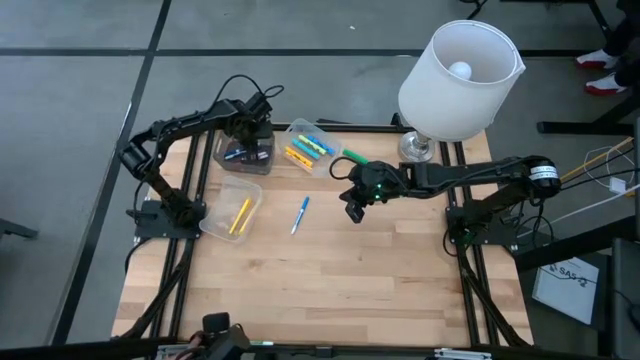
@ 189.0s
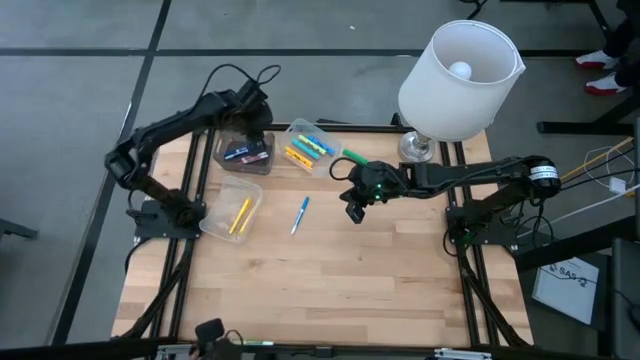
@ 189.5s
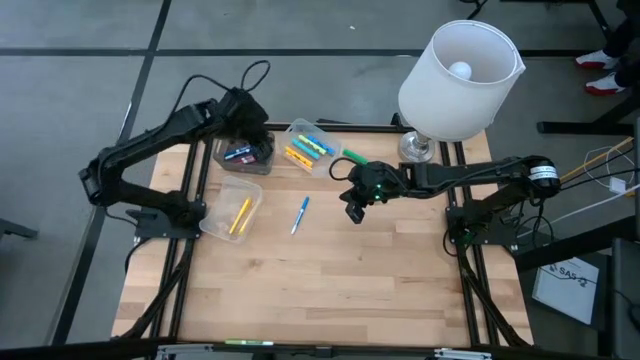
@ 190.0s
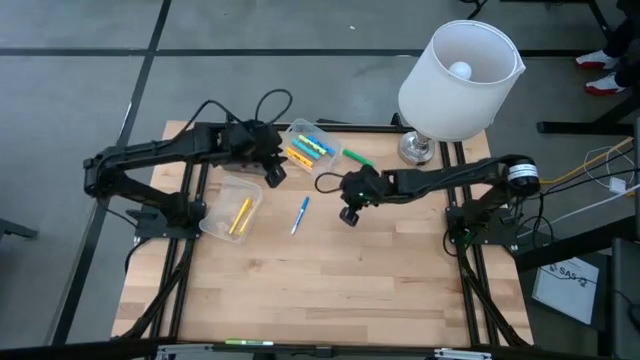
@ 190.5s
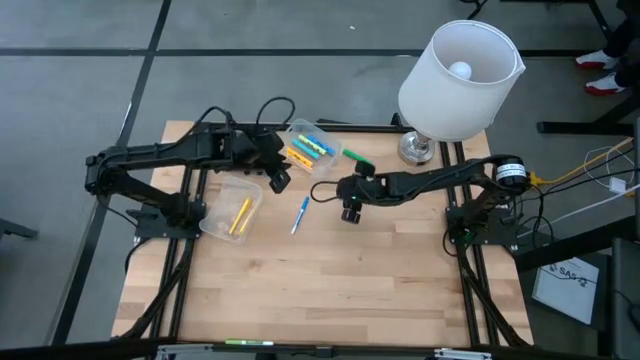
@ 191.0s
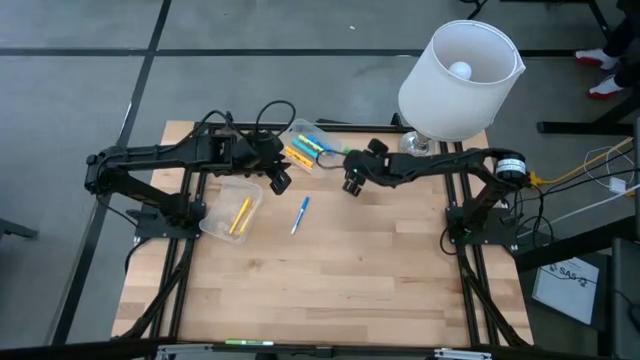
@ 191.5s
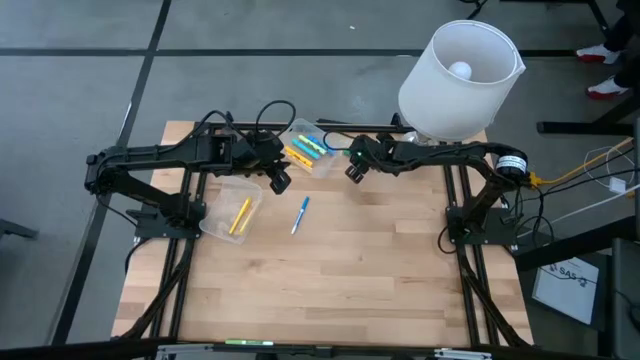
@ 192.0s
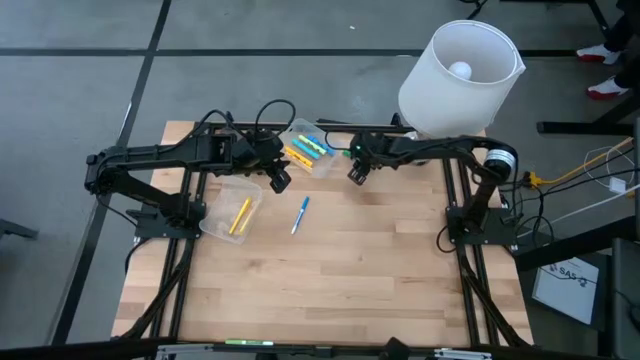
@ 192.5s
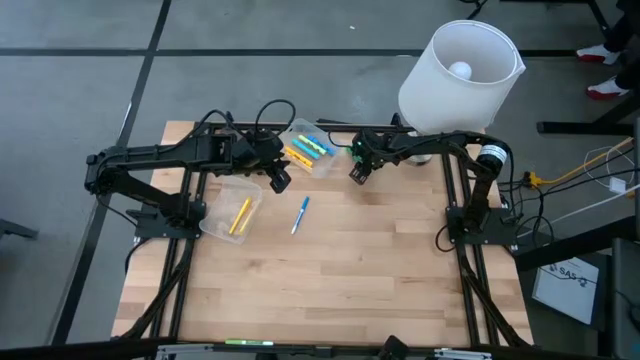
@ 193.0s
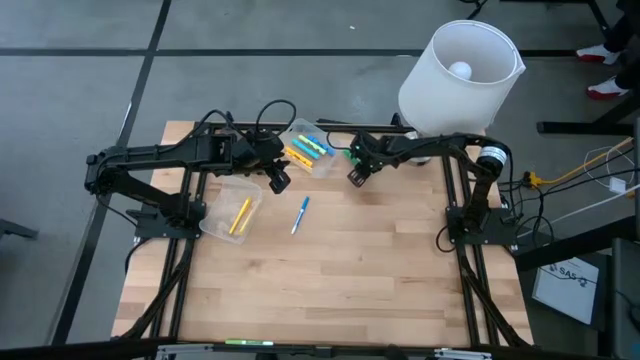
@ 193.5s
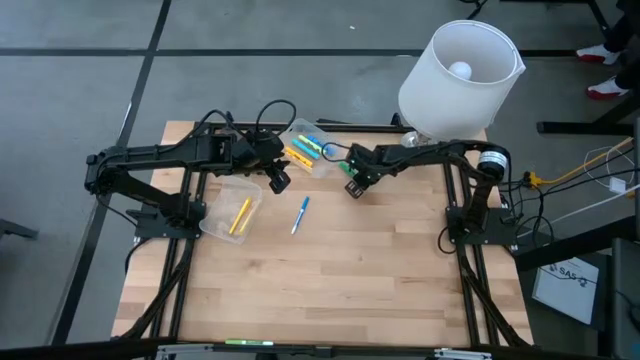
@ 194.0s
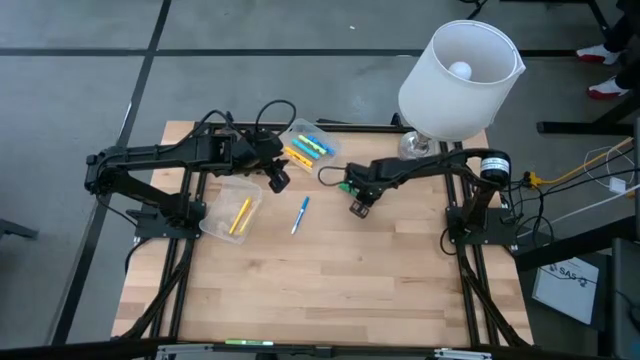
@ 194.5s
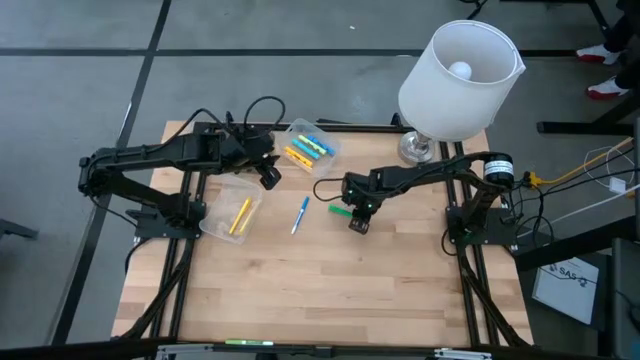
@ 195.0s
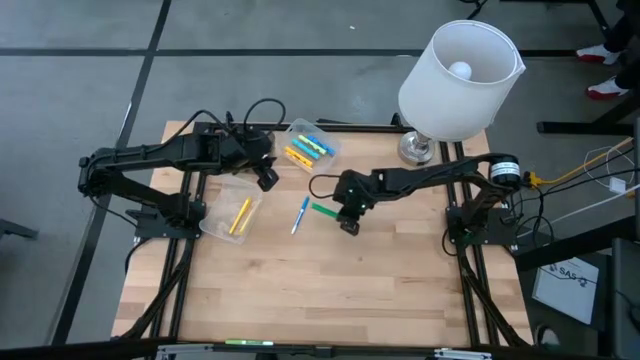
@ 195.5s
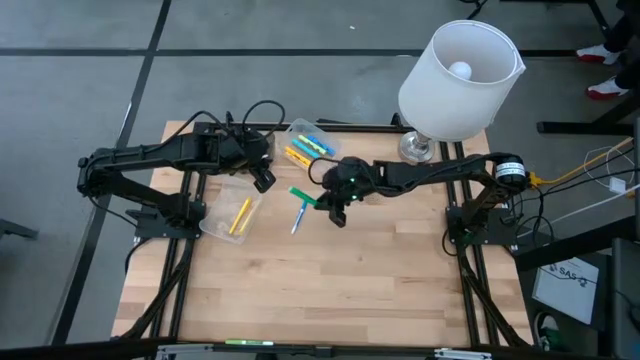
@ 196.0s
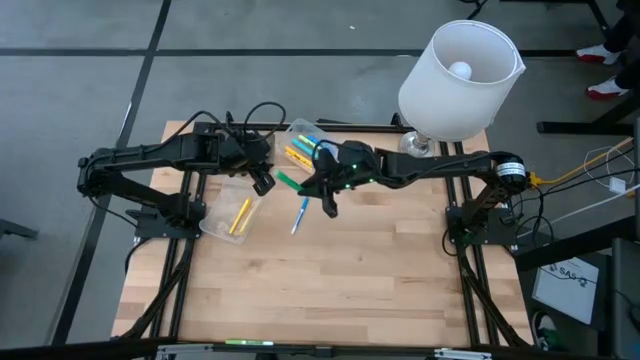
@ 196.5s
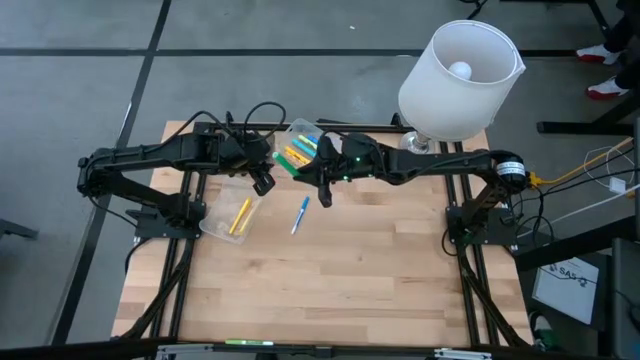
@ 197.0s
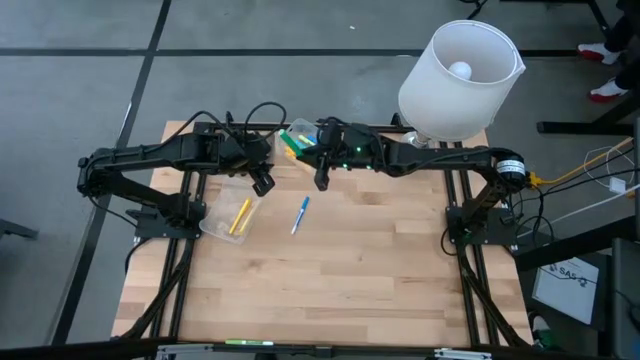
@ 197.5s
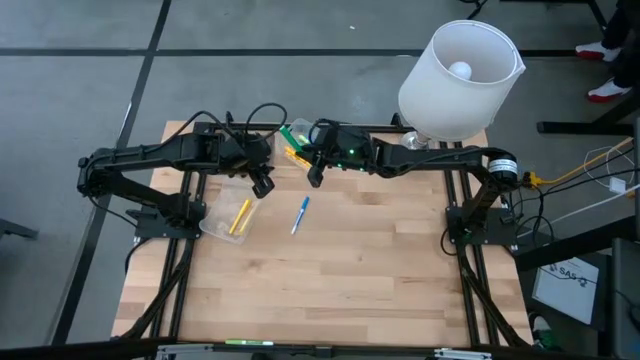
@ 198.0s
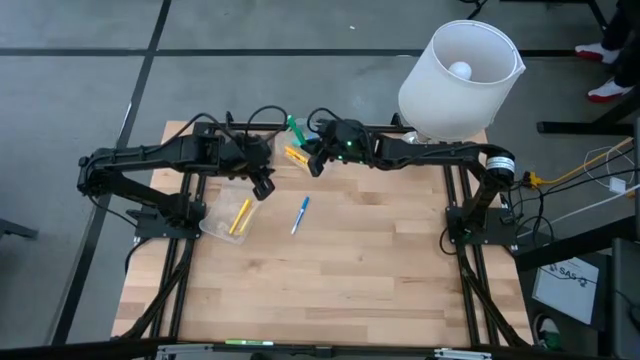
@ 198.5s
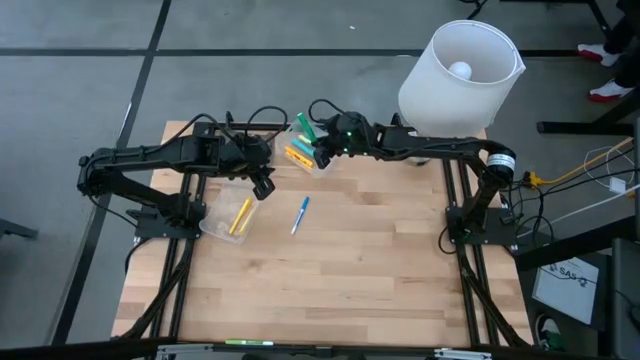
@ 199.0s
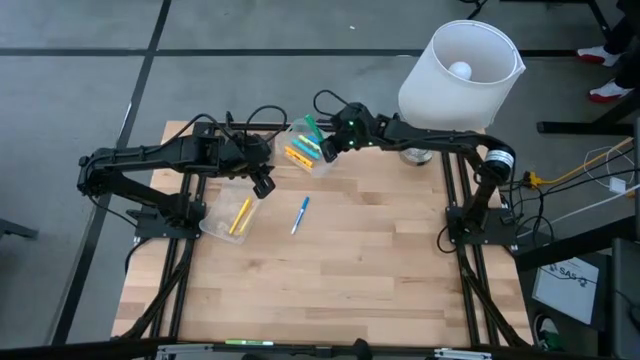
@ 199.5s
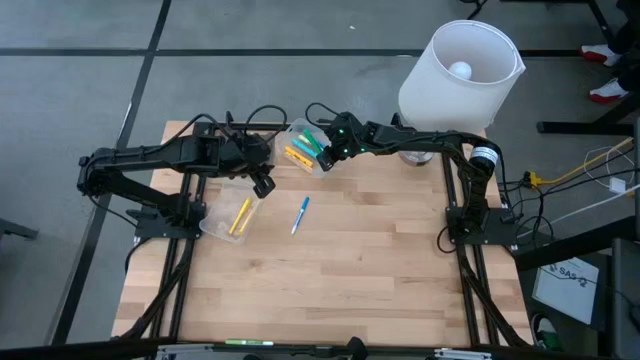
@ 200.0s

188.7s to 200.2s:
Task: Pick & Place Markers
Put the green highlighter into the top transparent bin

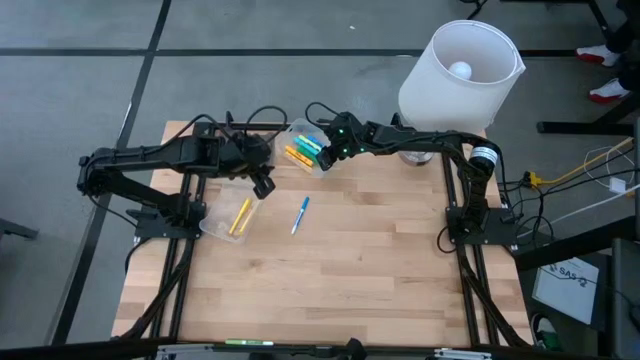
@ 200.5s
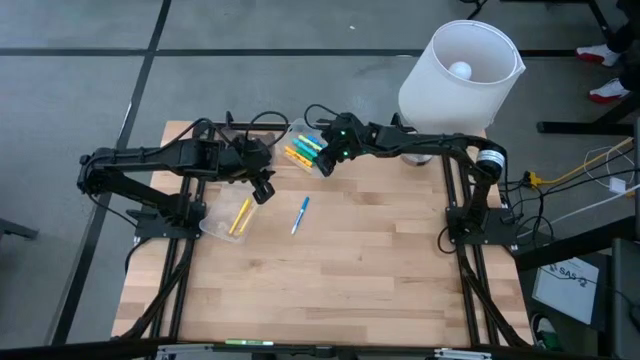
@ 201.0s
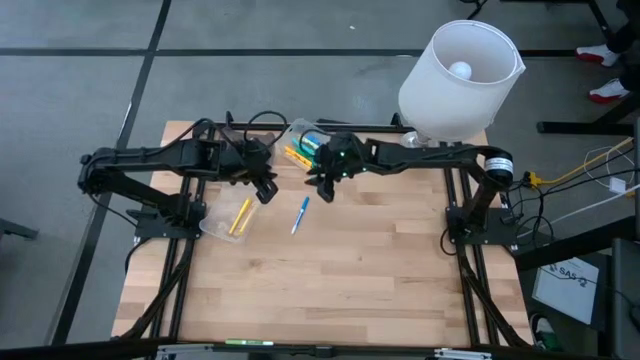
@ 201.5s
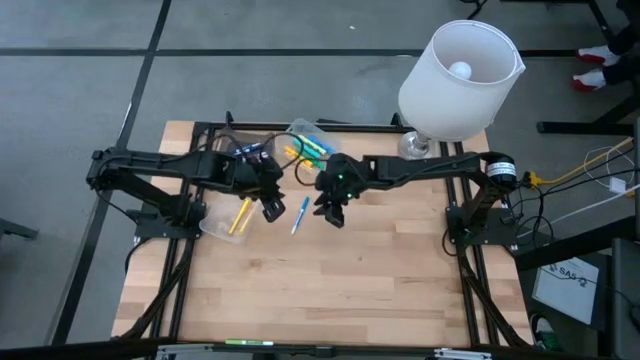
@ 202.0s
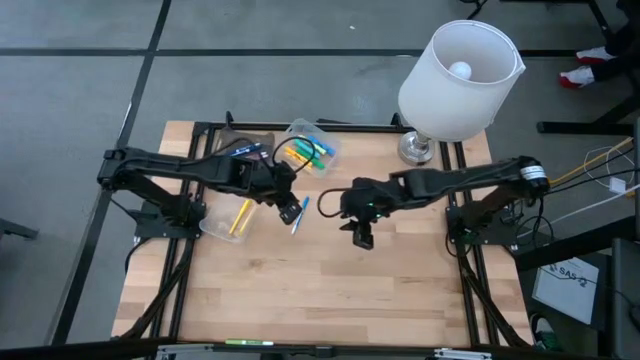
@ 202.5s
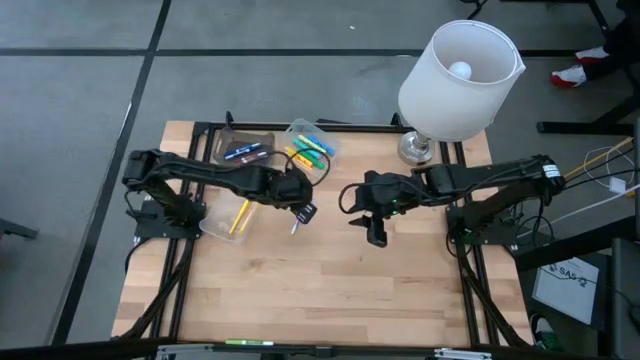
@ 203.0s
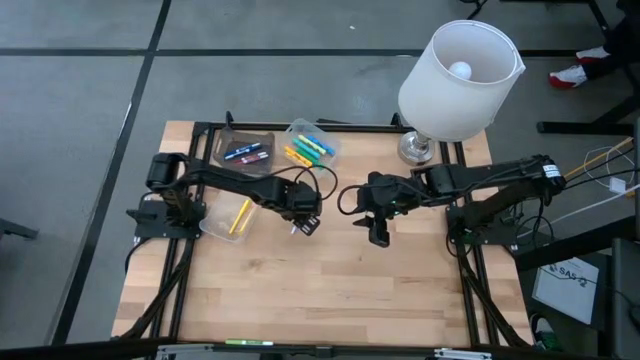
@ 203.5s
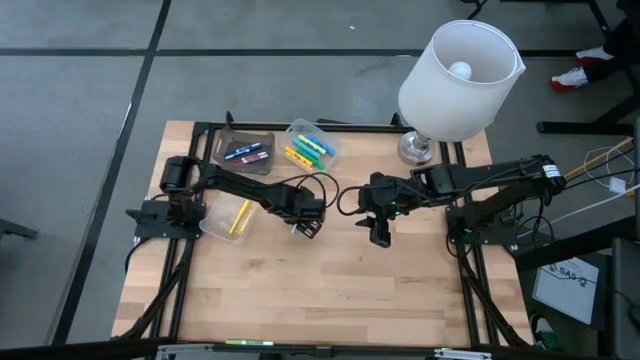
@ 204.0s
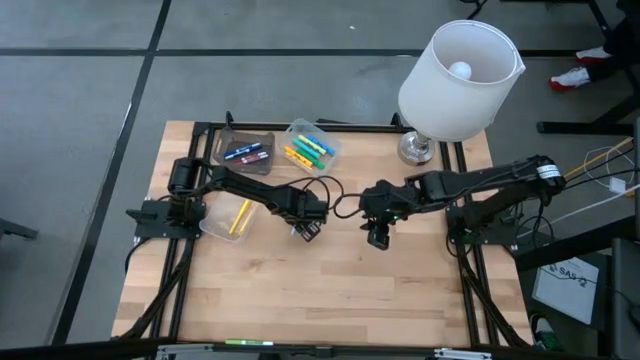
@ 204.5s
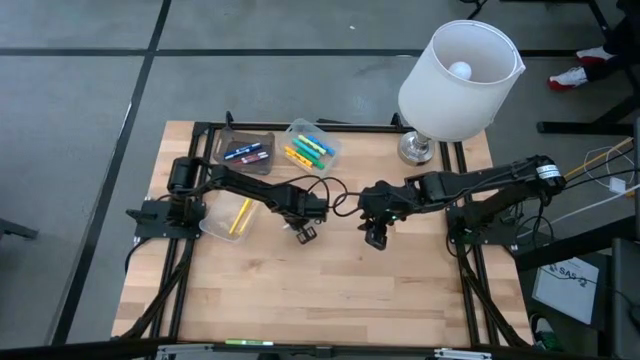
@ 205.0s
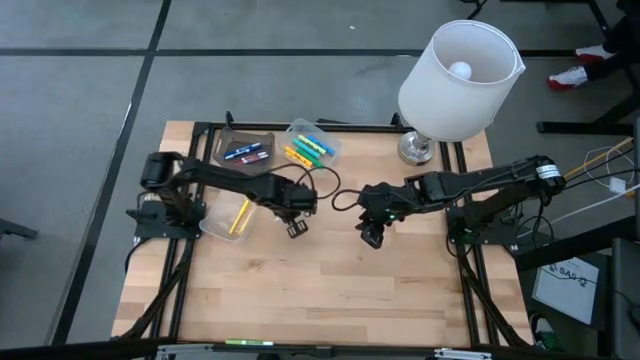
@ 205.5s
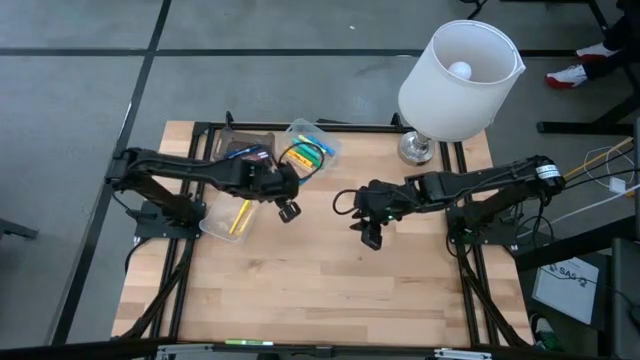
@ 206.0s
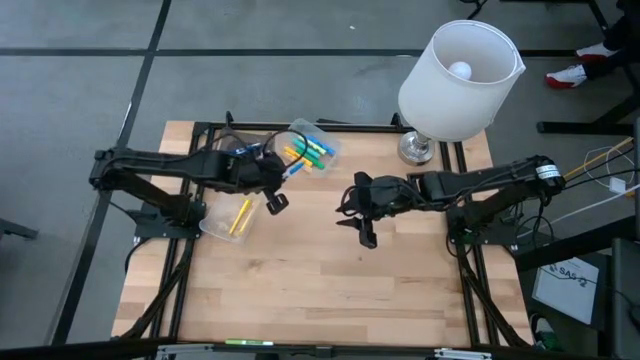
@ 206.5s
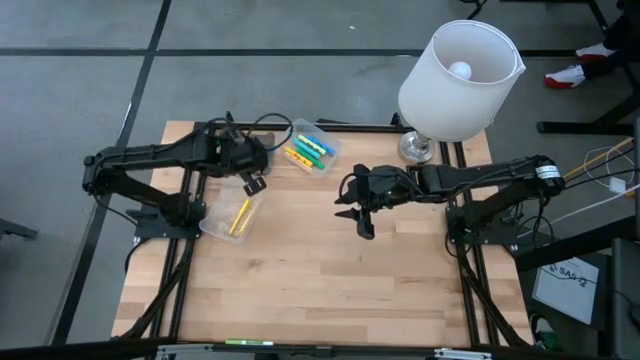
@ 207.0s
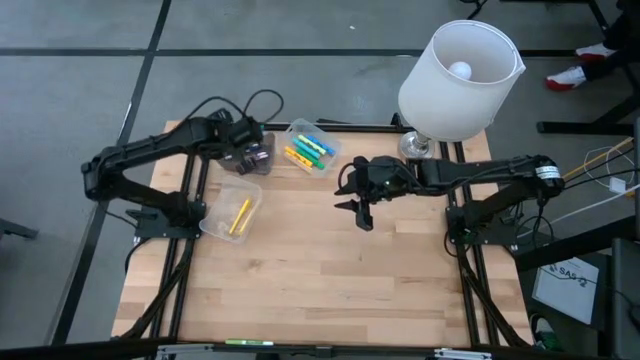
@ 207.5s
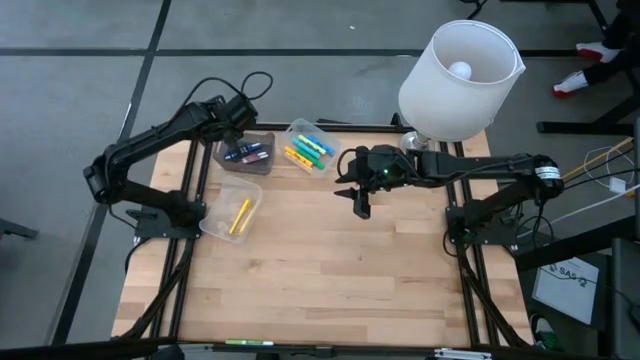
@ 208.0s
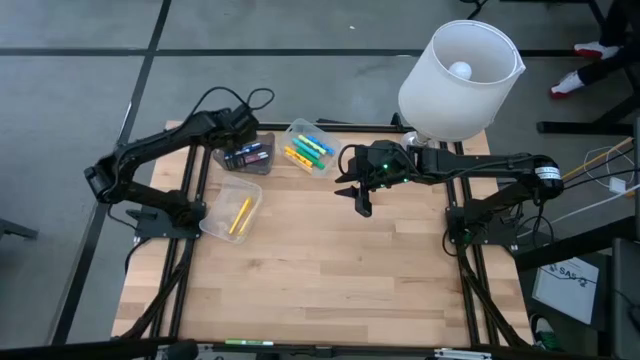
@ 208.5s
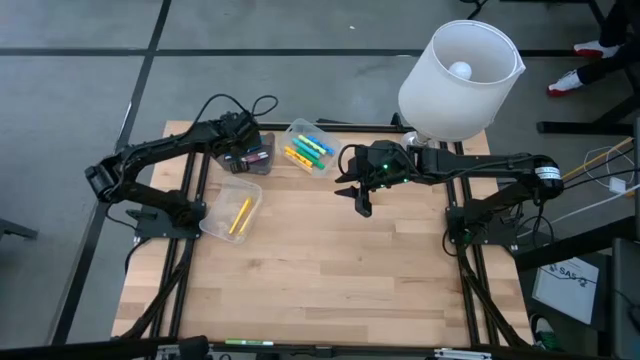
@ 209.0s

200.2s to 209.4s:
Put the light blue marker into the black bin
